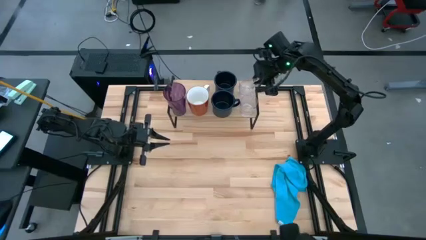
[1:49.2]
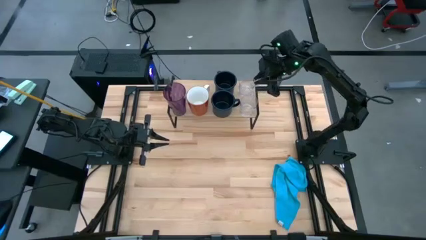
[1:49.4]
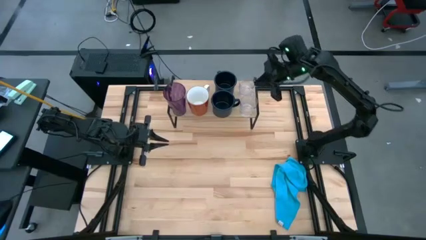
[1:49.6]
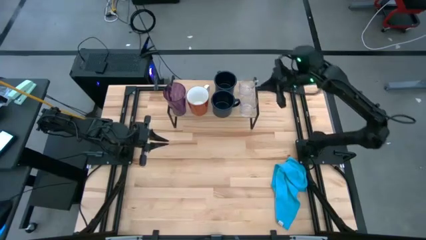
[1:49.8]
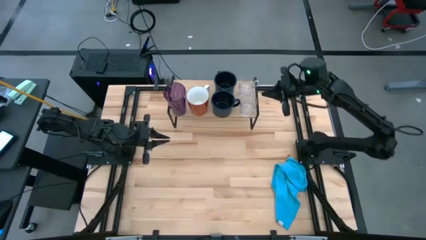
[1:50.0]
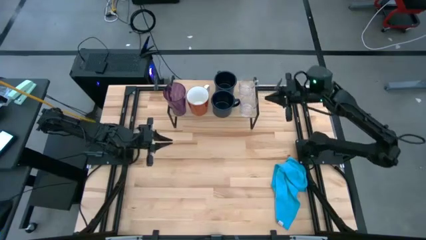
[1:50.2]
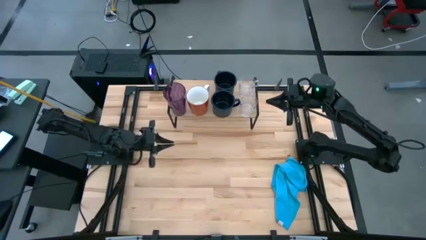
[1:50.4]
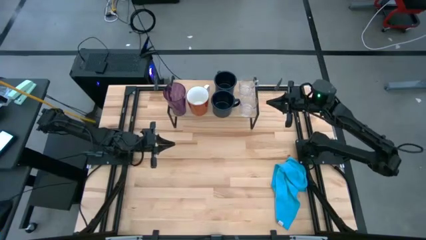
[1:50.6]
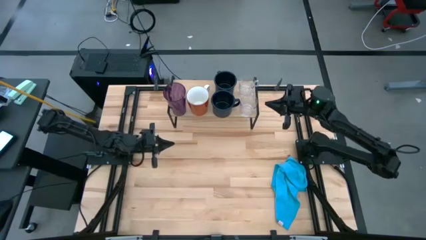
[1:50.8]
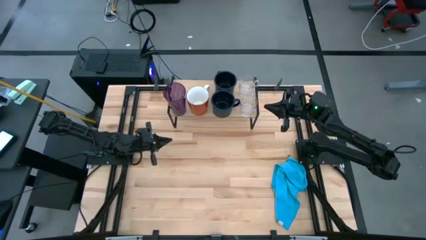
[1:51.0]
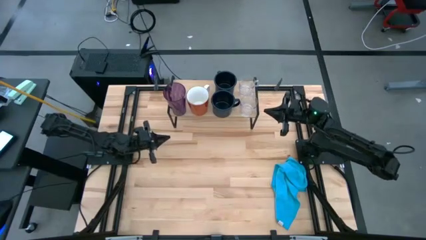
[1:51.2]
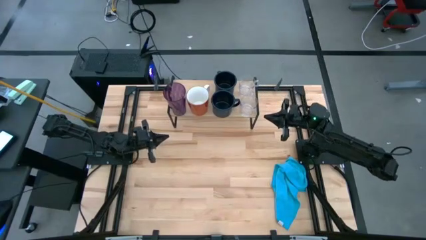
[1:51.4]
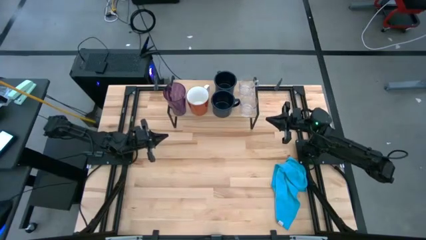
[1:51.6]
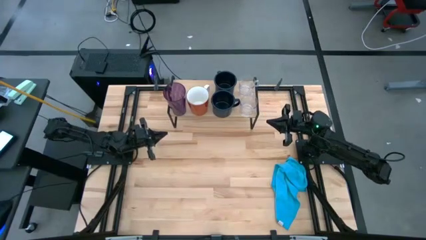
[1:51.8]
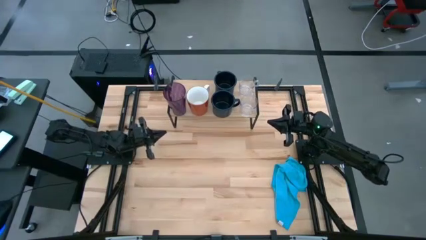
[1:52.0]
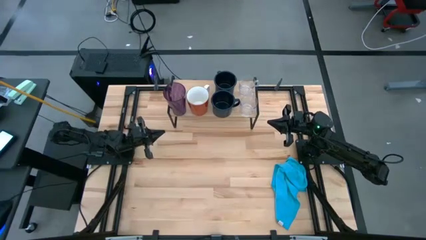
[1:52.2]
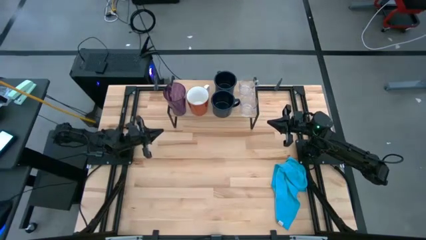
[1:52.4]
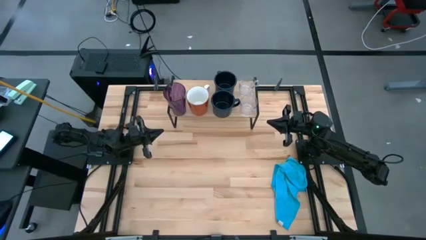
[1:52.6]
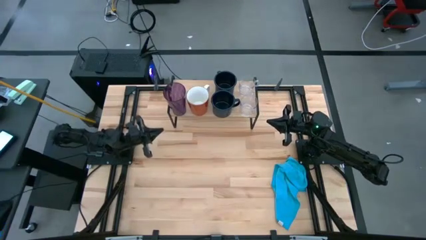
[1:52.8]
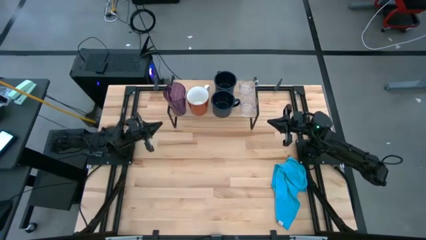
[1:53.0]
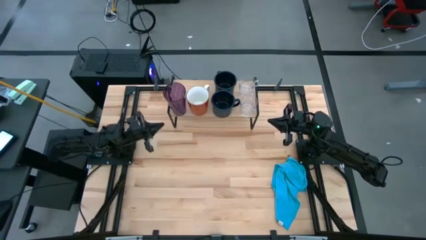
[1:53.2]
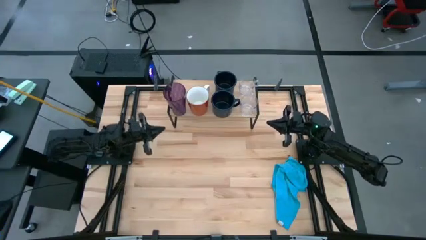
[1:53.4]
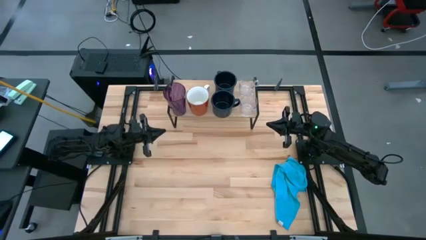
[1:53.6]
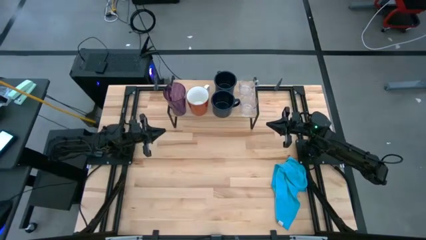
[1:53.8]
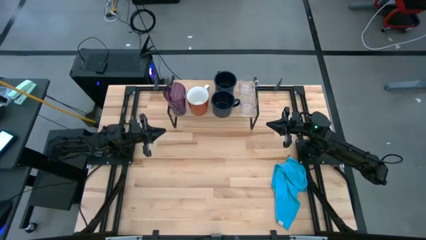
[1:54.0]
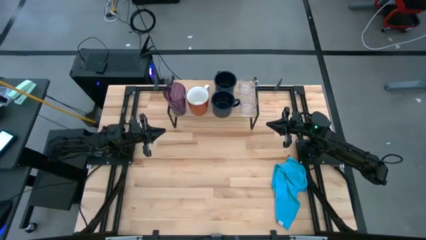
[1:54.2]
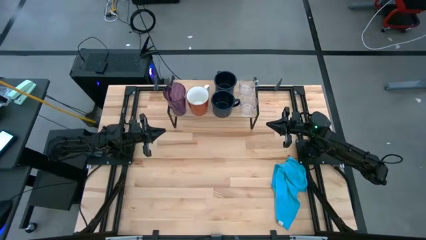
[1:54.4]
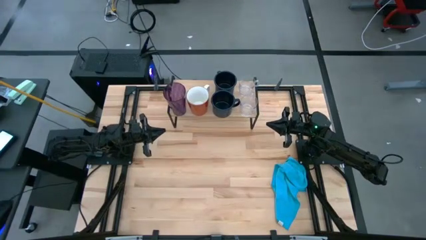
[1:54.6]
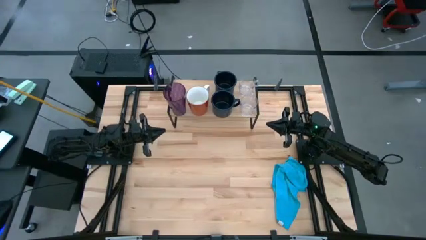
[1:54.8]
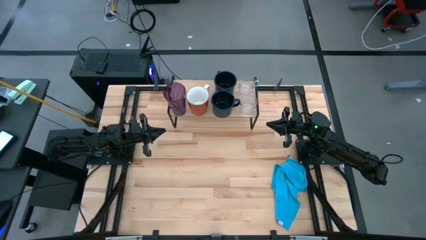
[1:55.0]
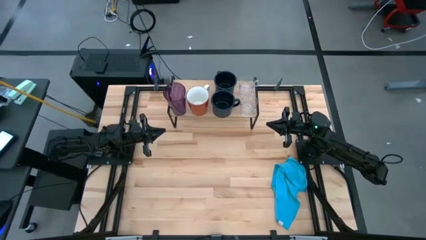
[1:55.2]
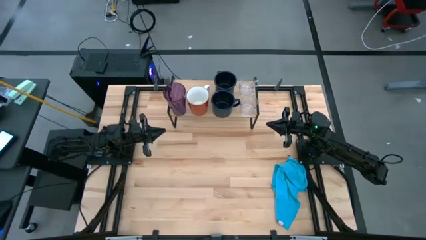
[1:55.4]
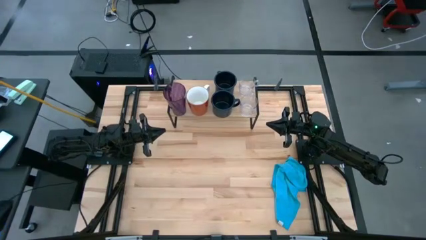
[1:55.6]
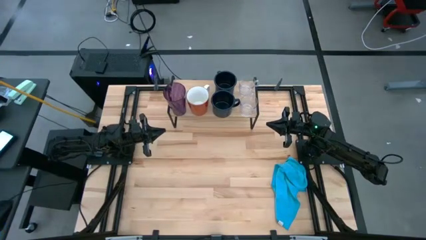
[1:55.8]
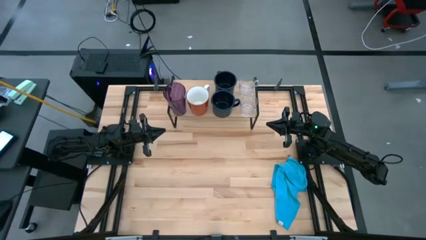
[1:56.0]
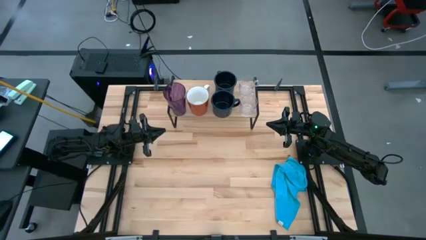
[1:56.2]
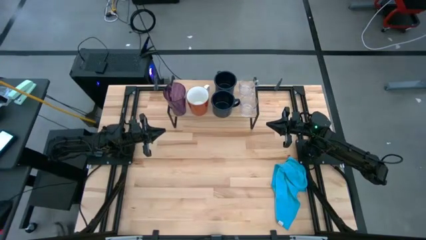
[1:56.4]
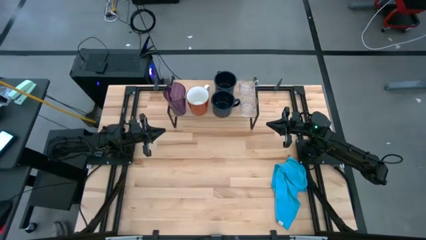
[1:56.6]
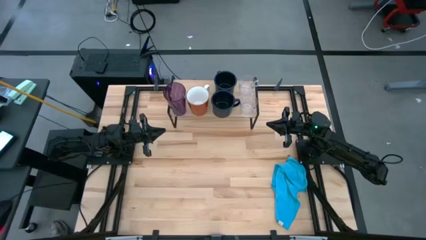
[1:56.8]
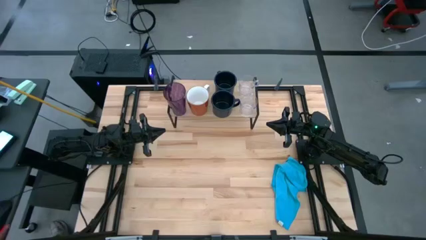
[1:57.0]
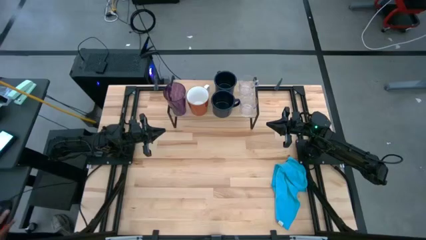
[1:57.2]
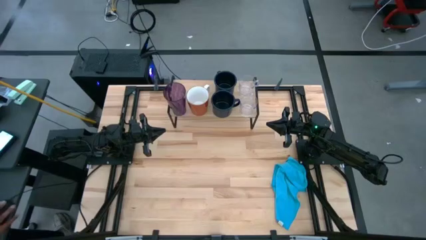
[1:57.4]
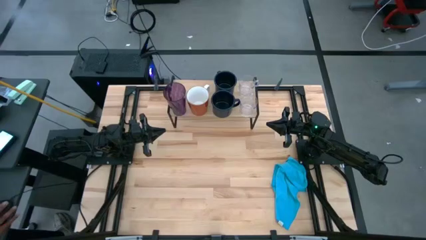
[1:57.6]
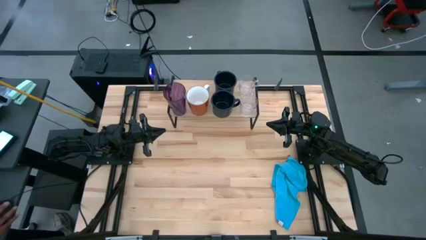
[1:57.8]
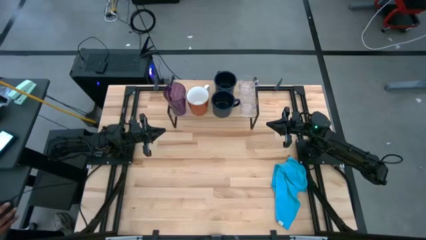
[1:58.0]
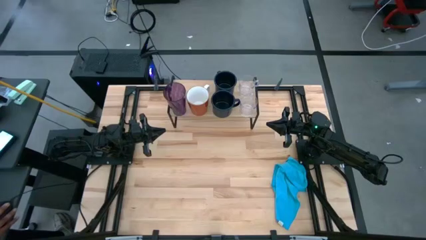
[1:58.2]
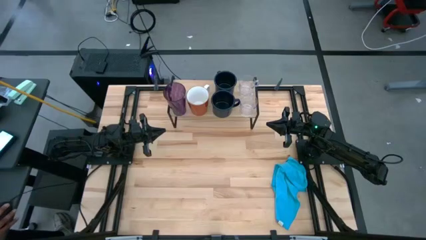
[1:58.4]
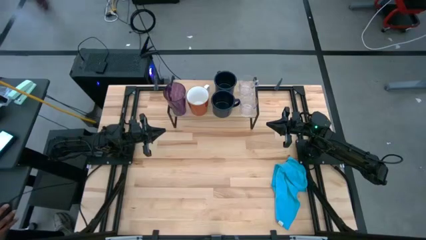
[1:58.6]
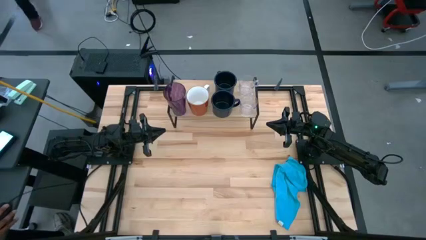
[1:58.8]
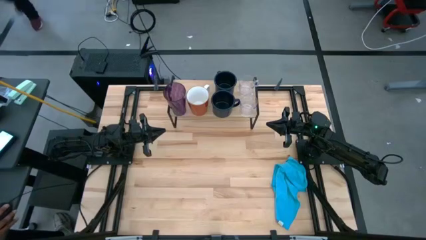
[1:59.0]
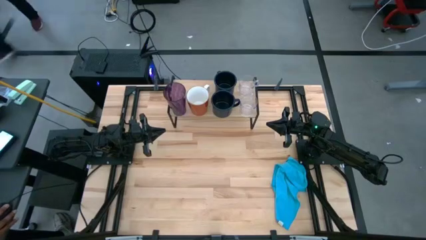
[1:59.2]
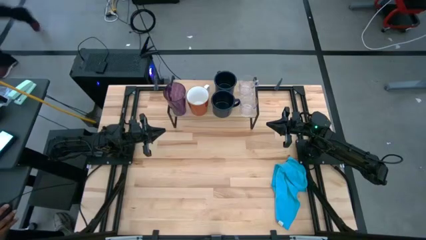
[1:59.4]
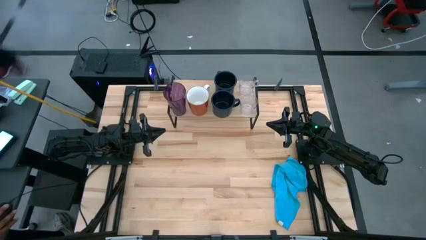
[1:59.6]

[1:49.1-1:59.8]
Task: Stack small to large cups/mugs on shelf
Return to Home Position

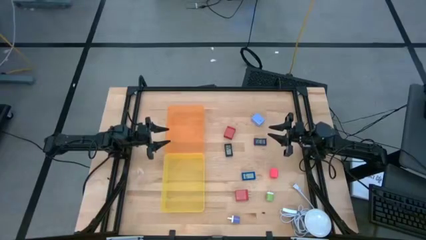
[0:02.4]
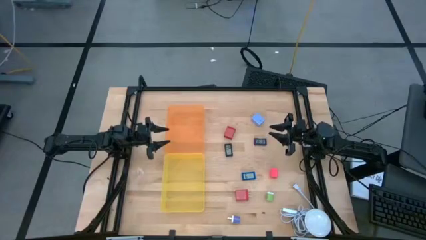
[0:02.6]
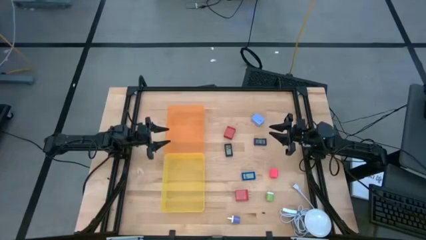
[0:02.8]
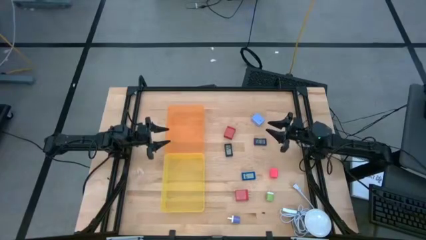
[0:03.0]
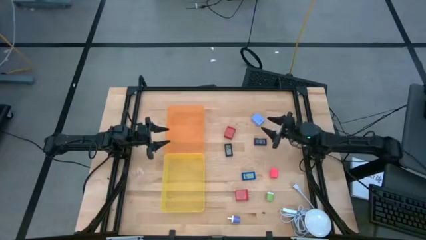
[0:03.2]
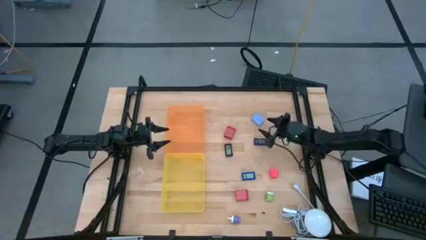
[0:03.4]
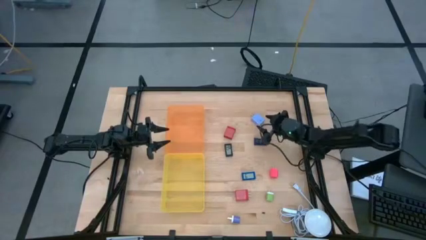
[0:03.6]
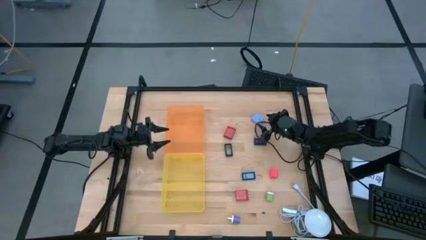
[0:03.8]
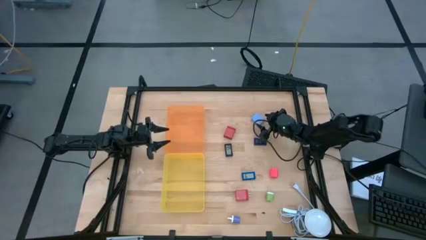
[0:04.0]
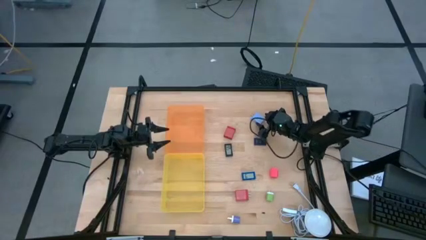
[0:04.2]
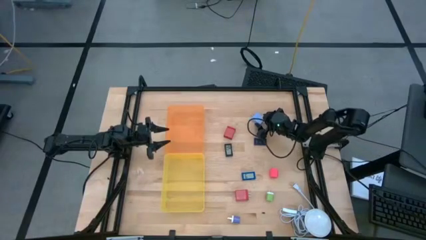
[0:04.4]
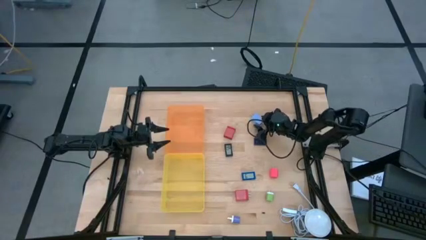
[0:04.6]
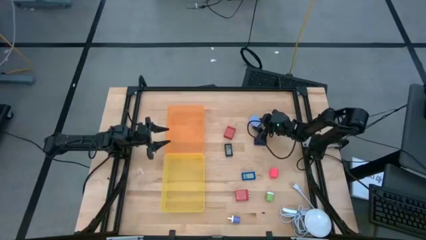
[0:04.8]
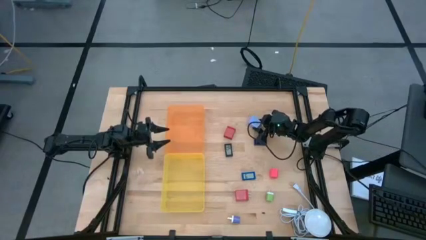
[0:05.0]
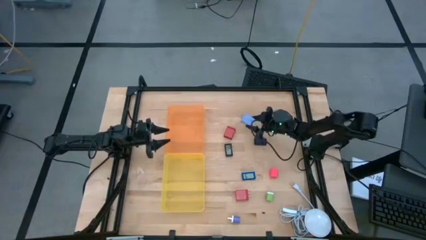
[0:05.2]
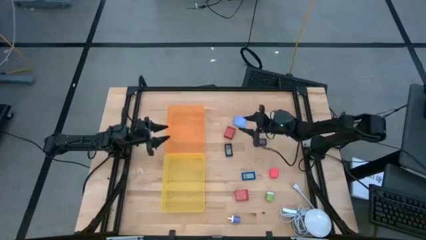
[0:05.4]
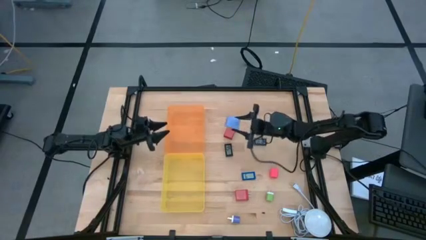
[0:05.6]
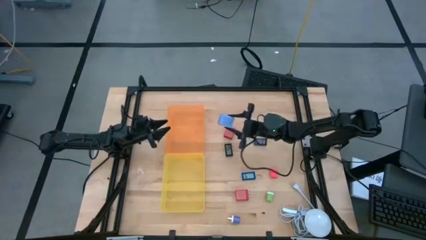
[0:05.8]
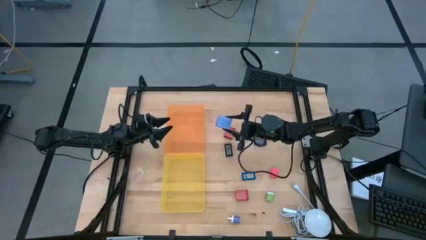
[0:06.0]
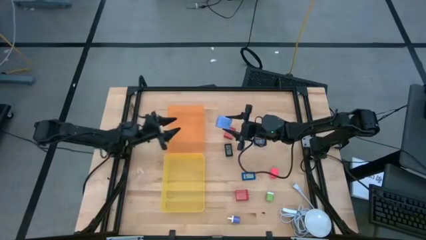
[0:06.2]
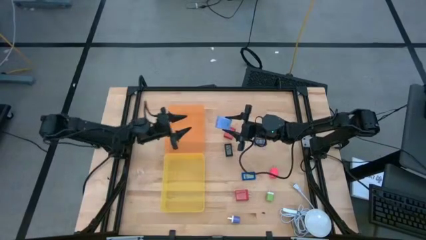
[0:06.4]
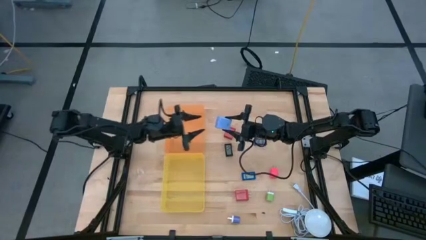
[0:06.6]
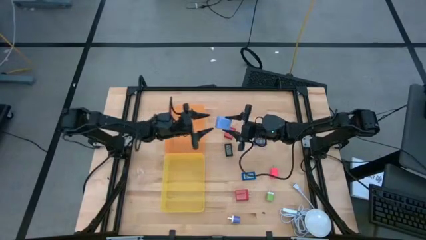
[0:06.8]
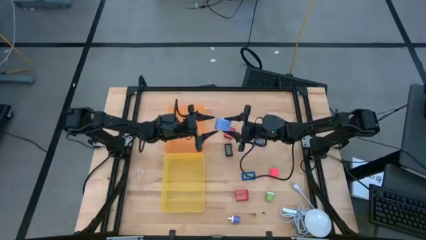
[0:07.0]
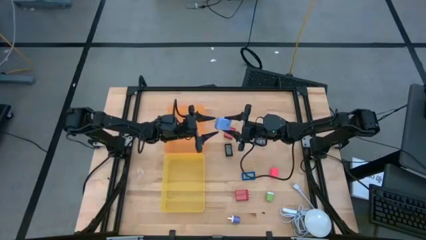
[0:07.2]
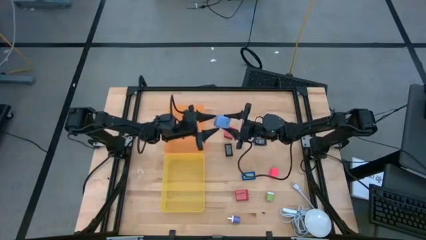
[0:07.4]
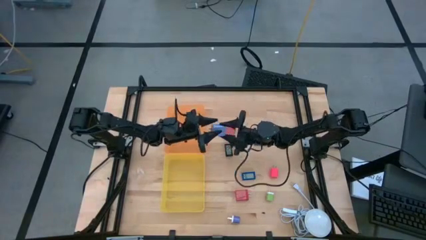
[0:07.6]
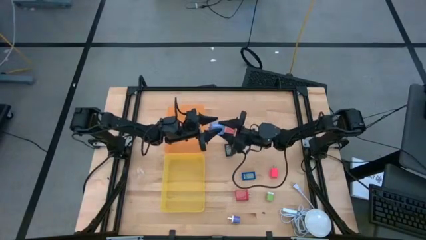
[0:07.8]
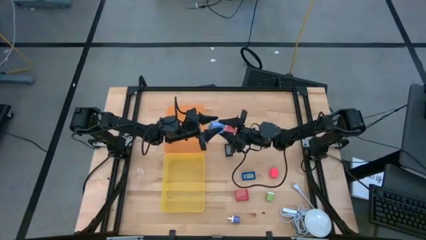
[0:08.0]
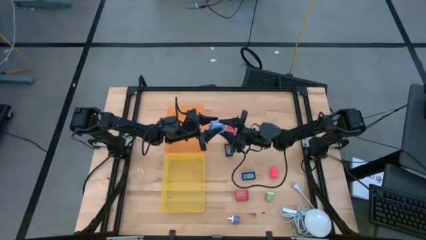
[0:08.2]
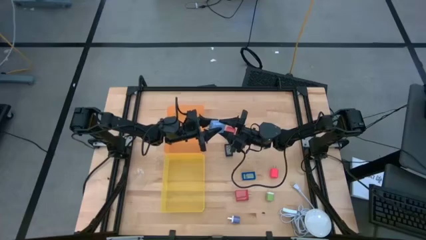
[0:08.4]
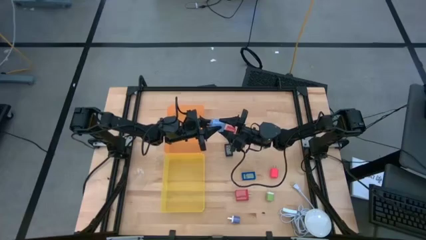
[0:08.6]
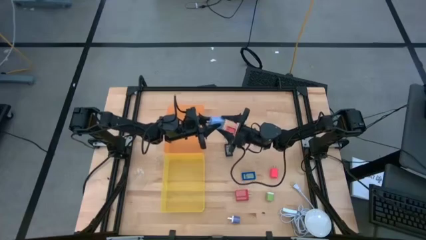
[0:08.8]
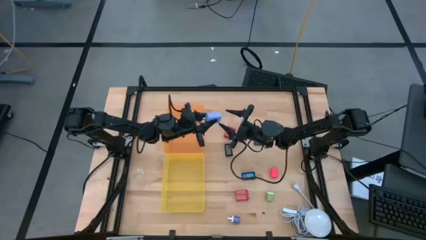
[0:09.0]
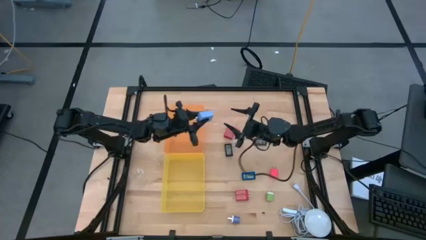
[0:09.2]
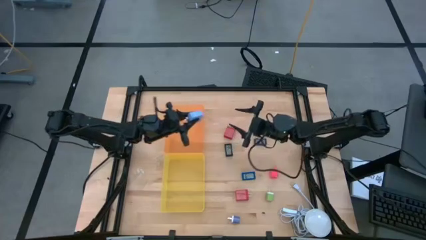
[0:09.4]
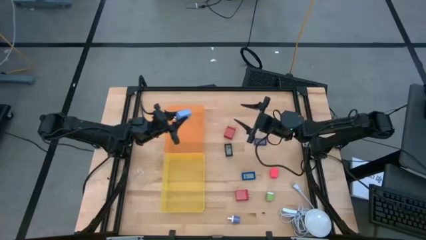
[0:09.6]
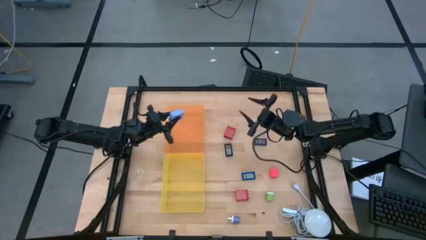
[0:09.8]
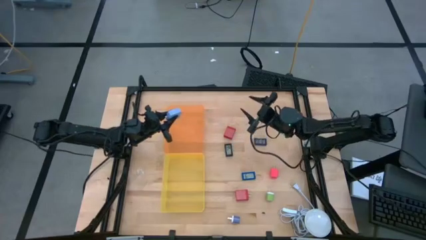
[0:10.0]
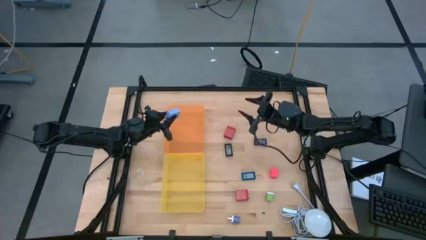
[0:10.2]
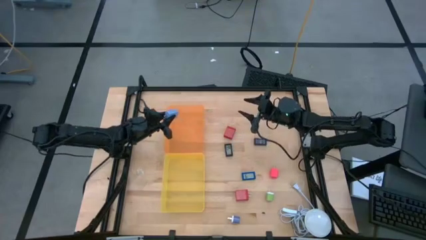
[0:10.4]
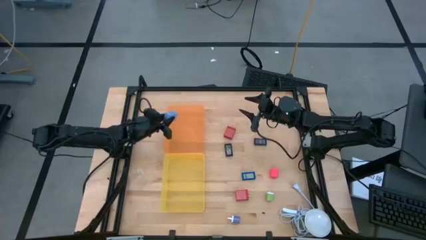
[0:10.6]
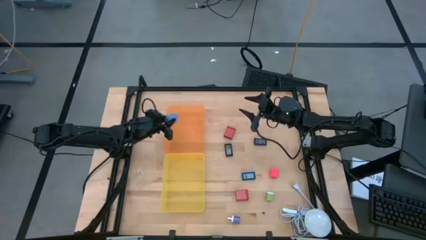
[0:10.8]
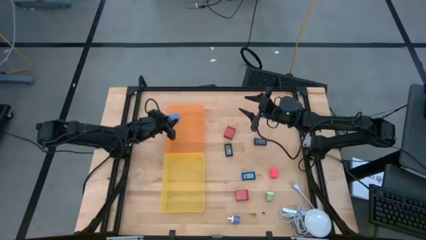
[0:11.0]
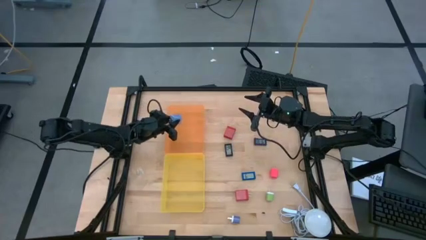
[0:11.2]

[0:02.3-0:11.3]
Task: Sort adapters and digital timers
Put the light blue adapter into the orange bin
